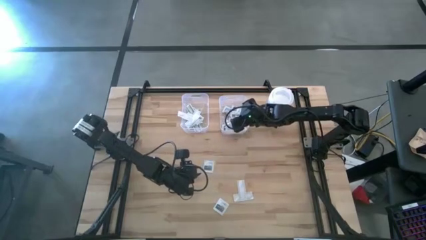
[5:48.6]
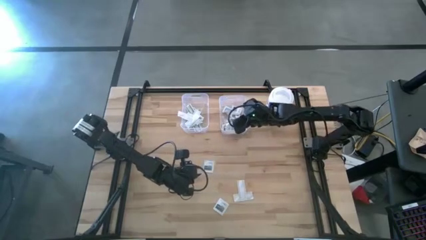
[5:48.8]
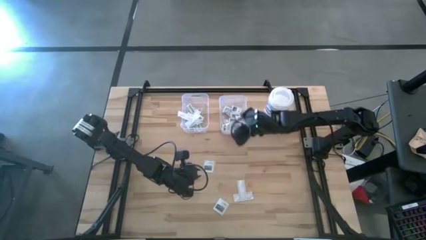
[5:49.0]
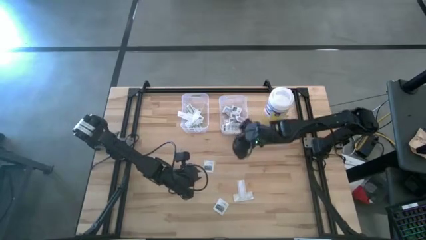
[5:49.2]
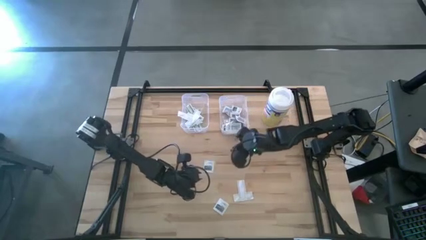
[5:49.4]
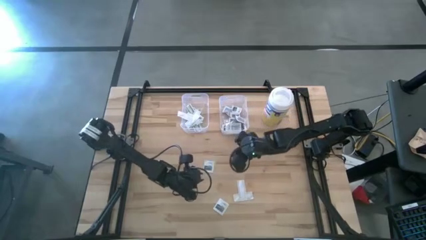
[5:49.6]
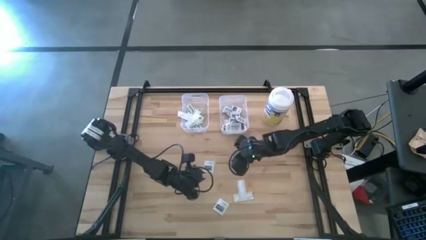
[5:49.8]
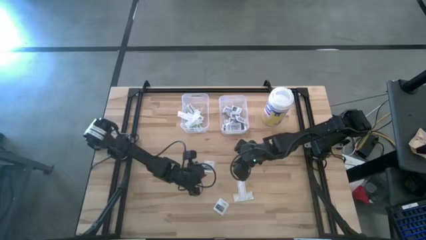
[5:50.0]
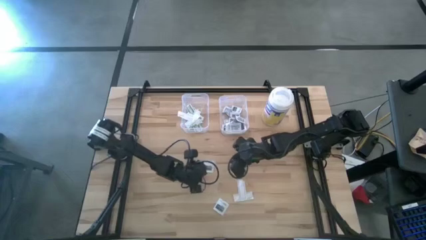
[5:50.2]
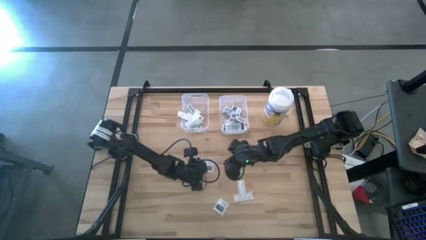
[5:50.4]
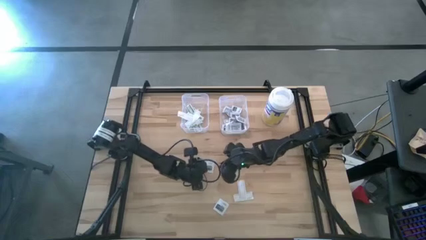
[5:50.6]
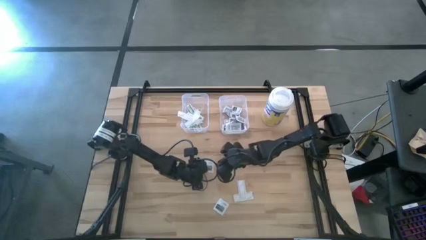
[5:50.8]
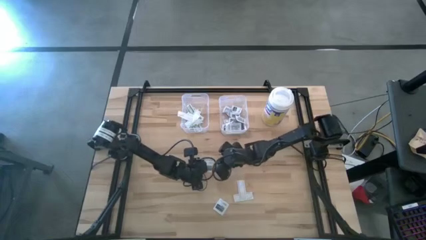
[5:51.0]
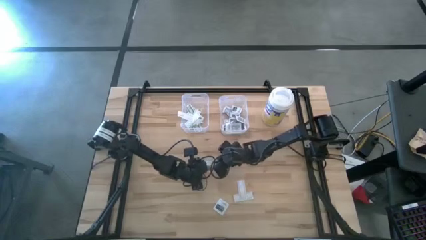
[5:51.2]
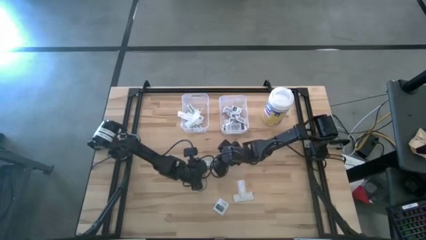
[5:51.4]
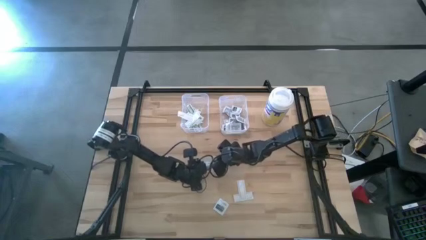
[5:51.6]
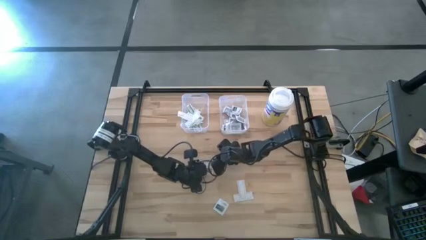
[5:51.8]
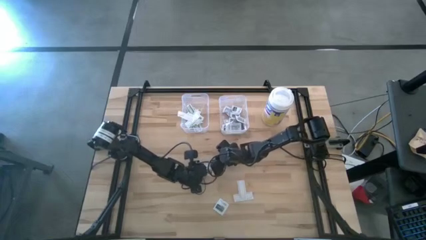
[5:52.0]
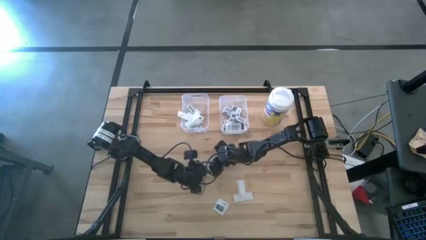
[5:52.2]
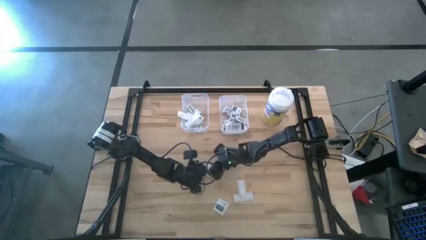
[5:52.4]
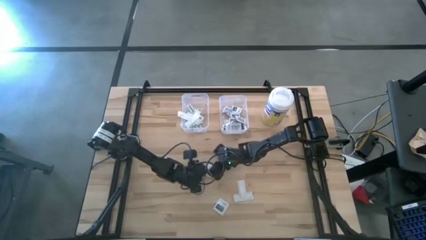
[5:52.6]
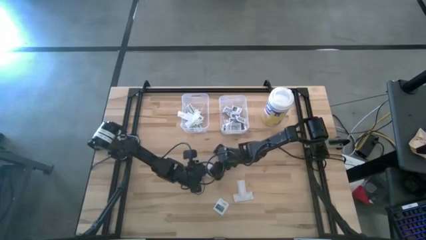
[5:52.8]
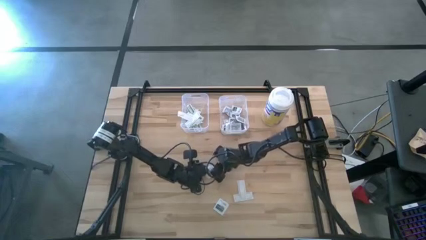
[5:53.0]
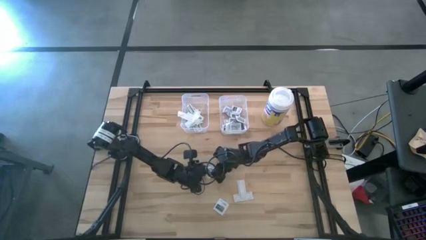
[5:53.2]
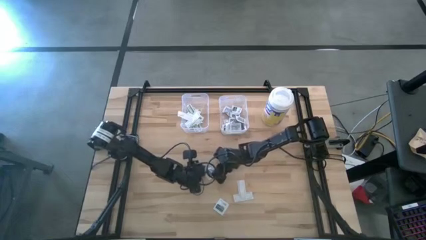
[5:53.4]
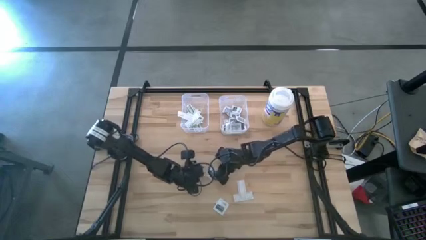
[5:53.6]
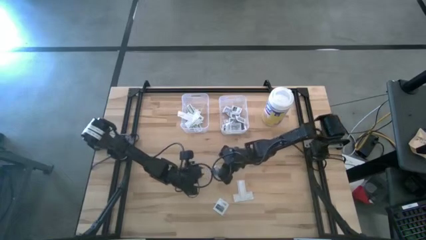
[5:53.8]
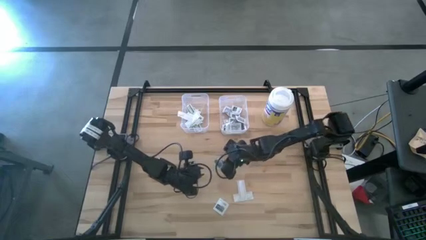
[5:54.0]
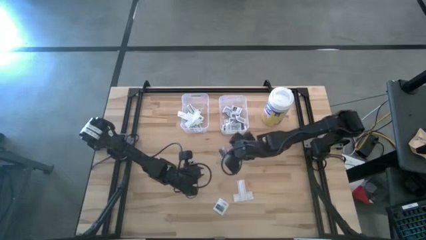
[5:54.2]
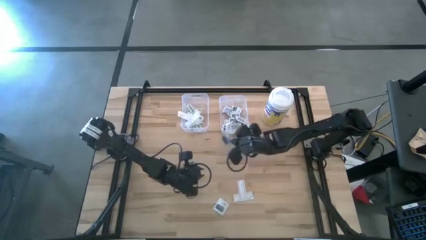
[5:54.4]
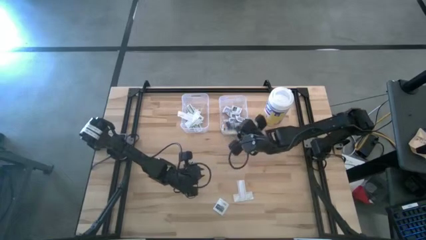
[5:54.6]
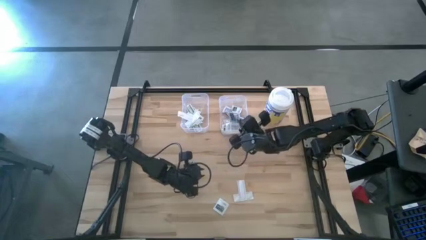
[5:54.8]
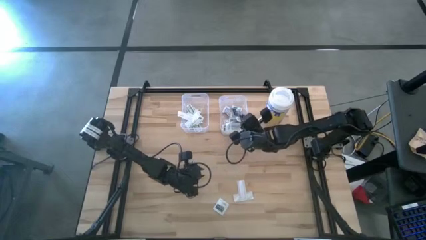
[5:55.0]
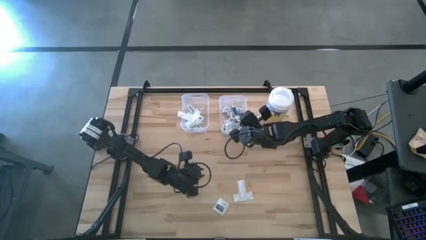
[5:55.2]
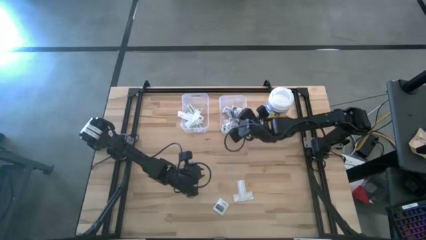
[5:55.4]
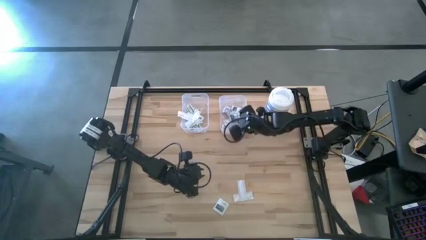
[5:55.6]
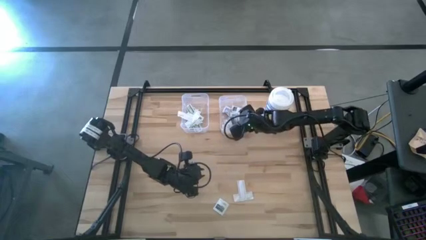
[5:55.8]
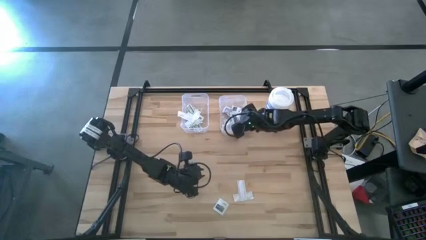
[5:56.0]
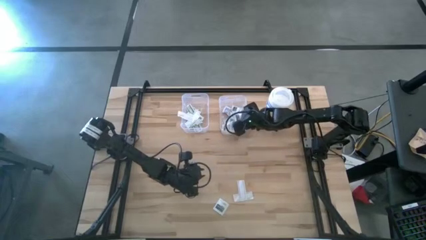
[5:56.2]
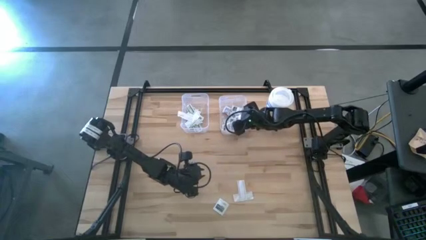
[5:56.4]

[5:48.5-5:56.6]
Task: Pick & Place First Aid Supplies
Put the gray towelette pack into the right transparent bin

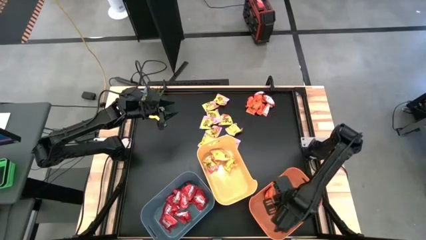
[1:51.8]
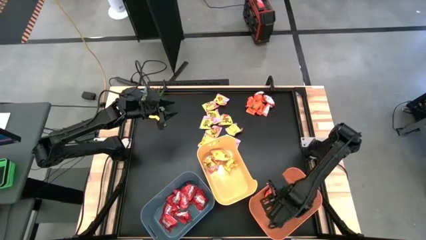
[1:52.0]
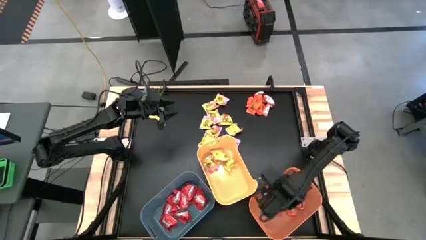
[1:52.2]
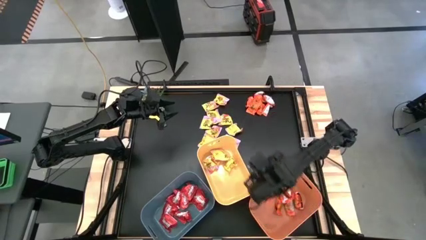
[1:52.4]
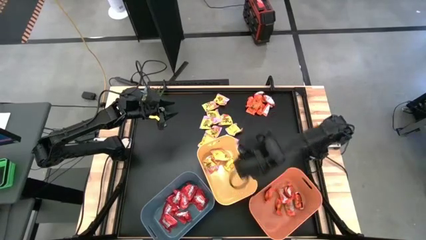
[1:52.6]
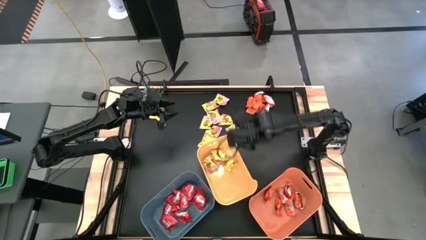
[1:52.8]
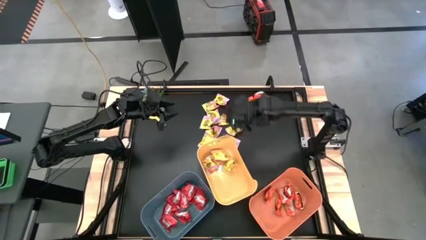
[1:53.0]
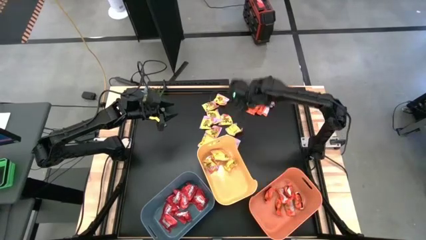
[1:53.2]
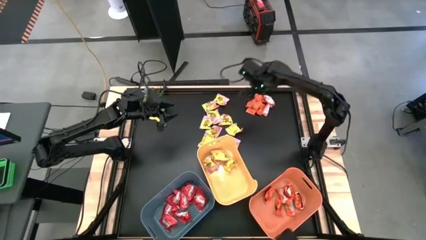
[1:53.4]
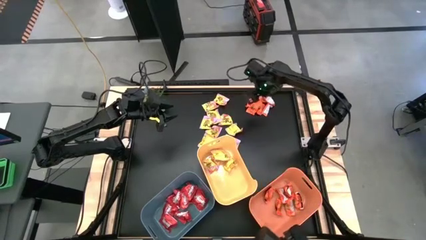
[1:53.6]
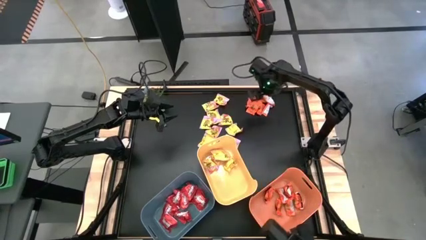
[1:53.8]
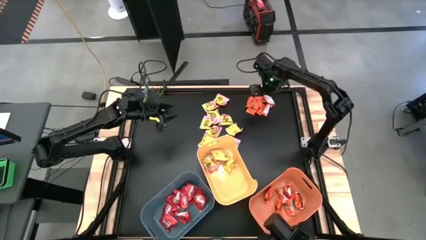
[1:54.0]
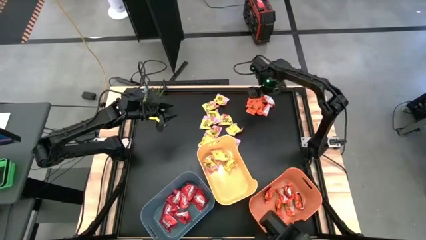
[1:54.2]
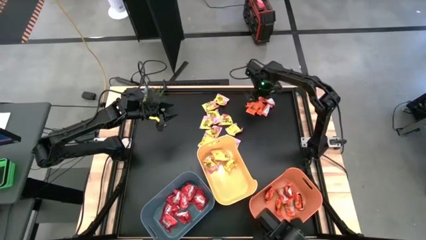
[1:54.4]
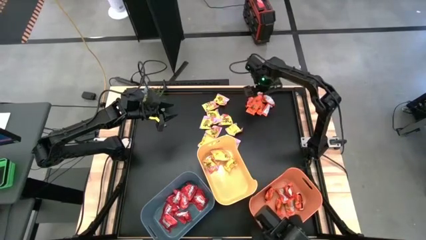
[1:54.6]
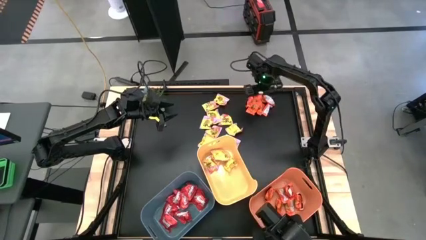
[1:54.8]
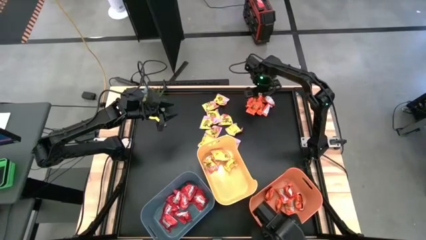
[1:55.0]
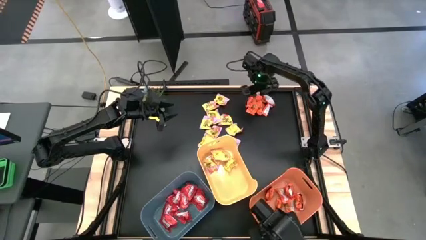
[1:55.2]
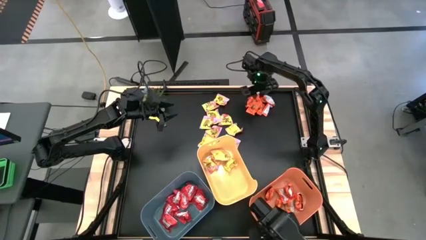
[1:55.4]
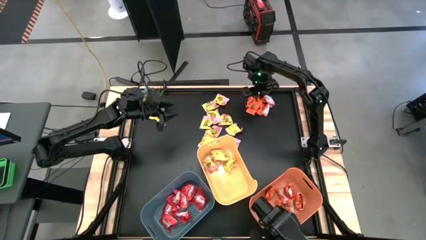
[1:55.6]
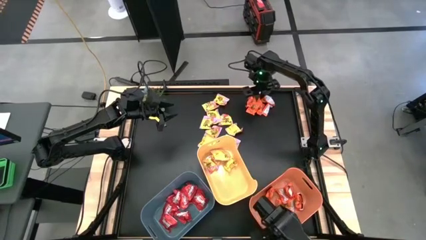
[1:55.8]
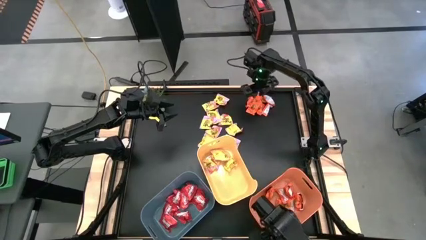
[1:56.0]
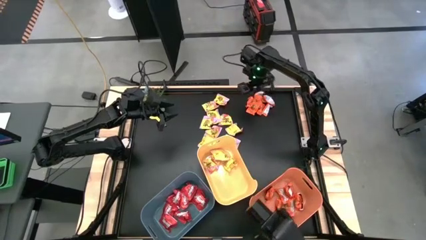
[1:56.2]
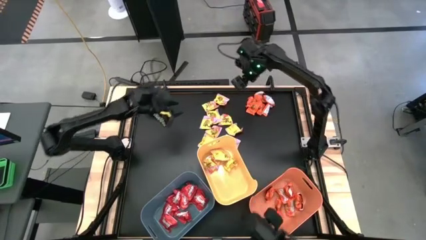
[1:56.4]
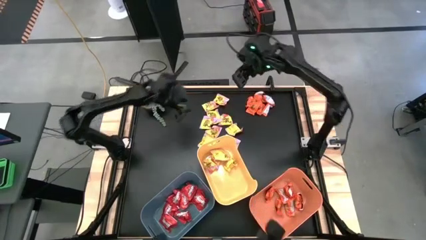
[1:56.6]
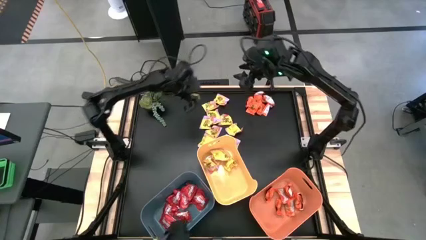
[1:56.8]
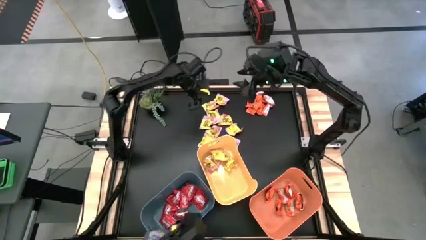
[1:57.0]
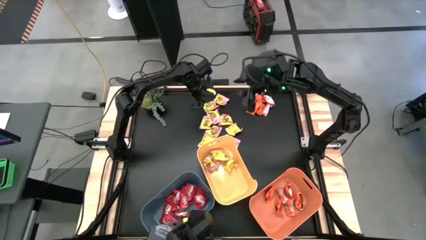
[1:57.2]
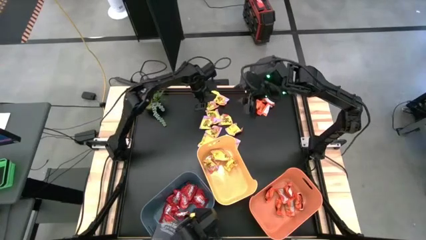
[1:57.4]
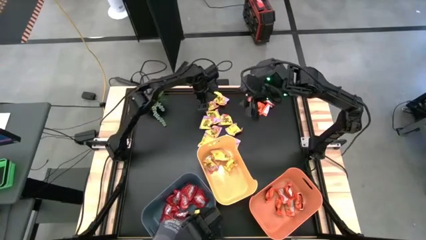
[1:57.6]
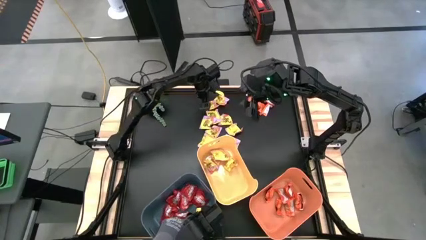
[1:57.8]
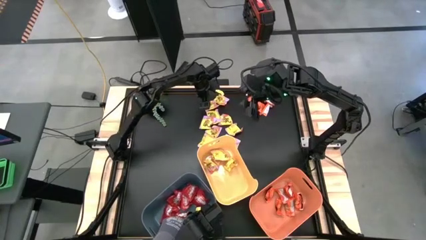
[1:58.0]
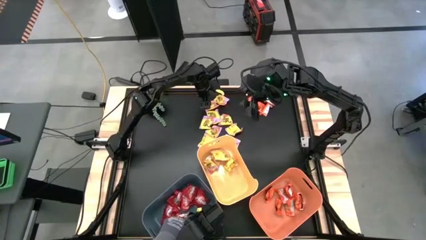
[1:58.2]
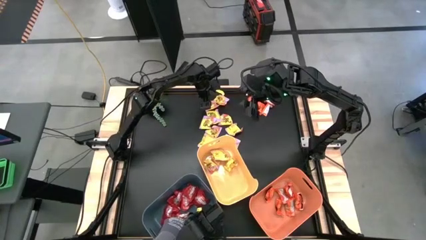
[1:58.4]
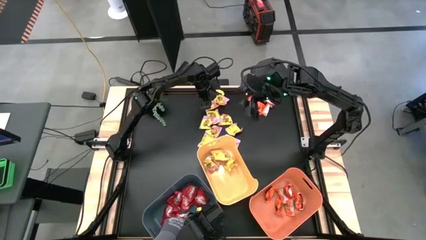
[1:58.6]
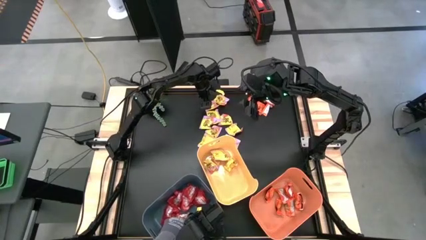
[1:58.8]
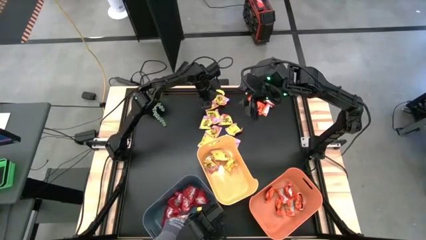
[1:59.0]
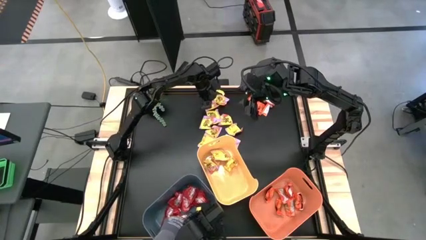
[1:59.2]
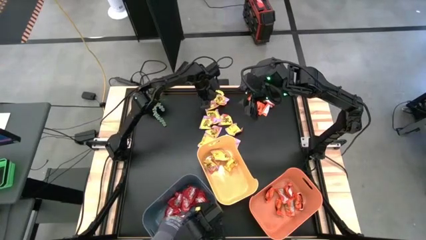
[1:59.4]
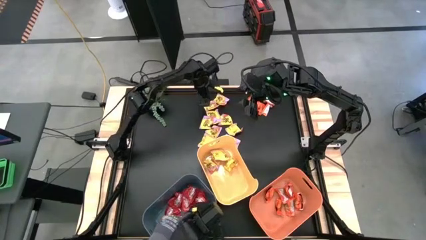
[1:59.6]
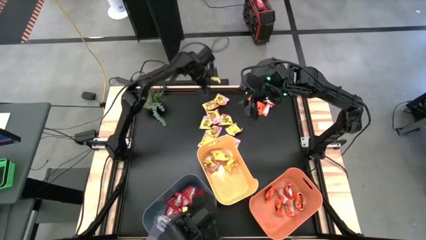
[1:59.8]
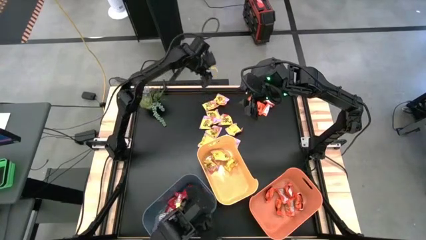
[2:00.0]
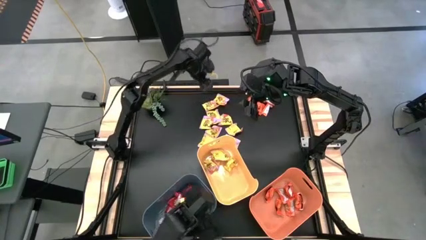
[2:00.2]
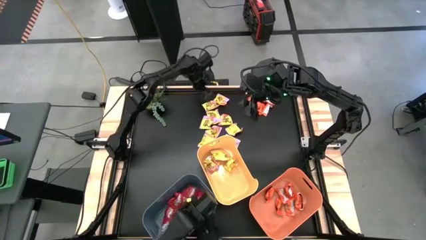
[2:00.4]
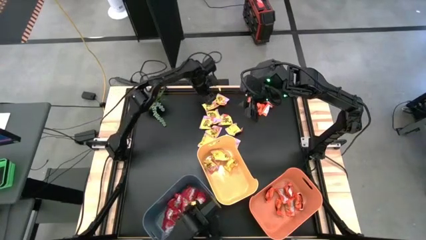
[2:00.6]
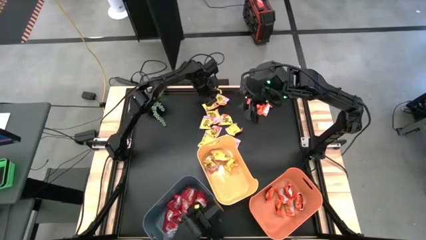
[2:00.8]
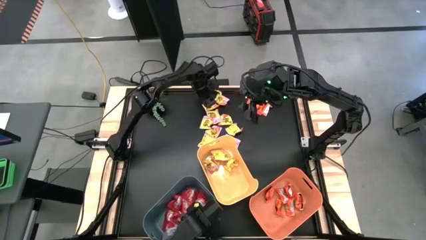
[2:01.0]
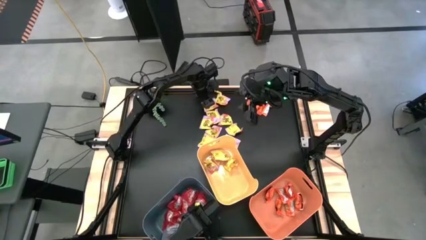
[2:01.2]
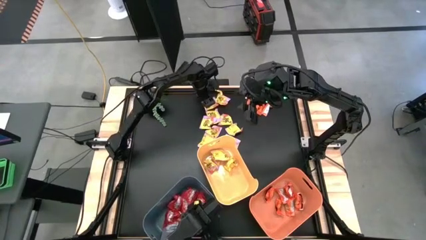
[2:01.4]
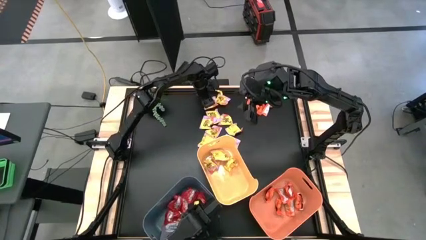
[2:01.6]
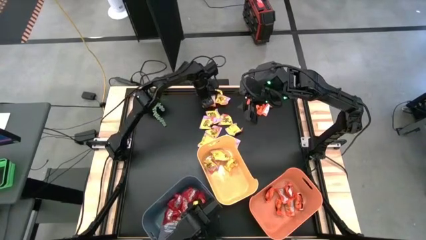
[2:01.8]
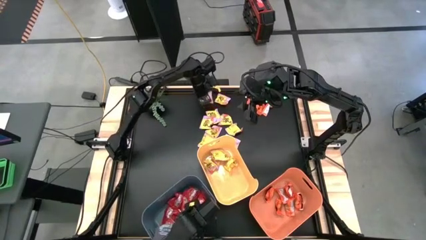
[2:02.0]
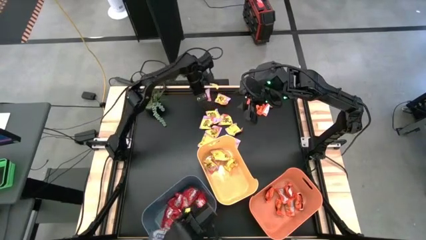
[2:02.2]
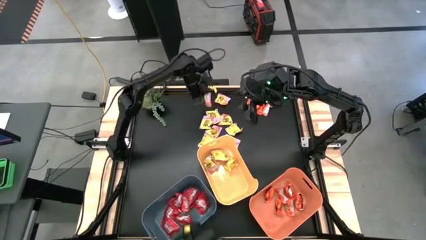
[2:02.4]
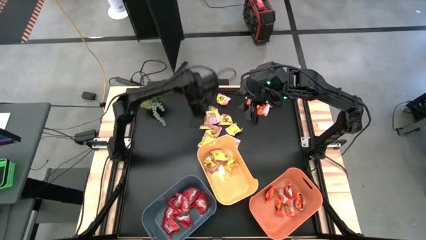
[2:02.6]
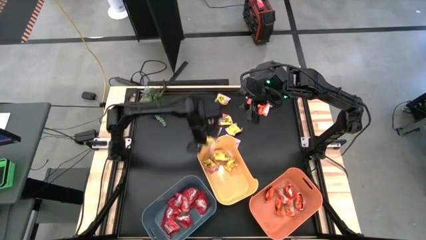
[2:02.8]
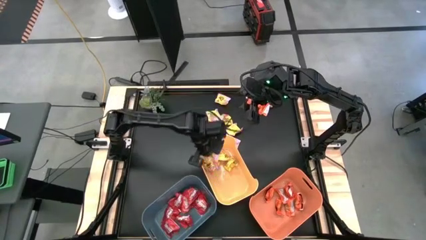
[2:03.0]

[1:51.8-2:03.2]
Task: Sort candy
Put the yellow candy into the yellow bin
